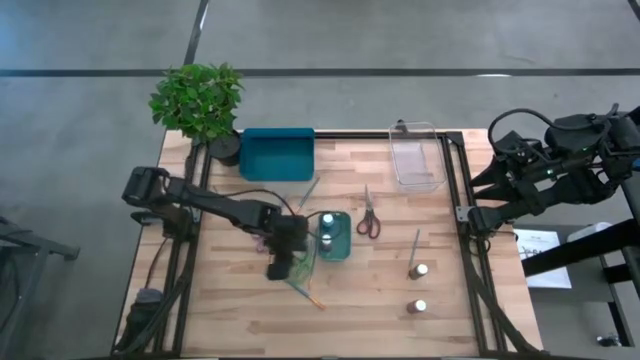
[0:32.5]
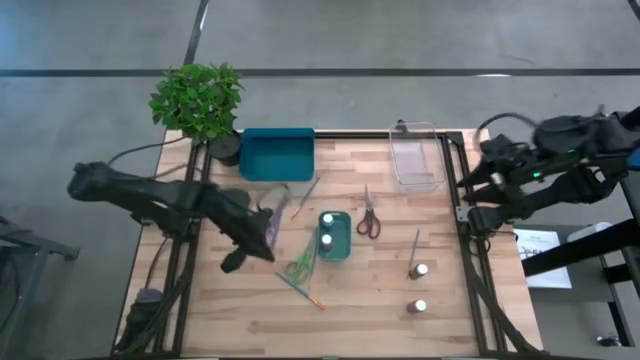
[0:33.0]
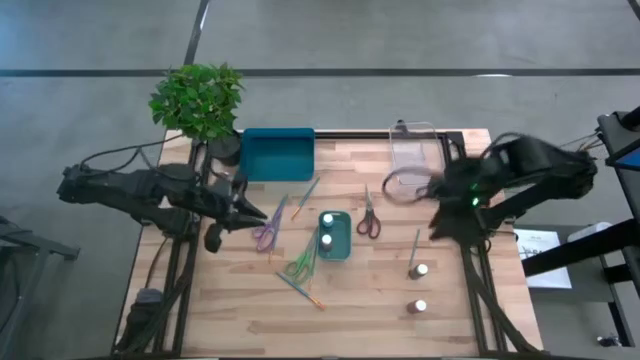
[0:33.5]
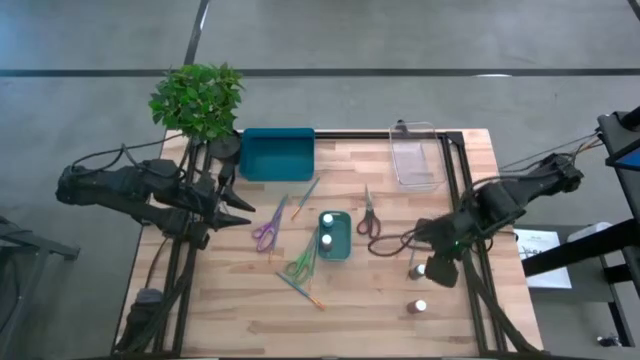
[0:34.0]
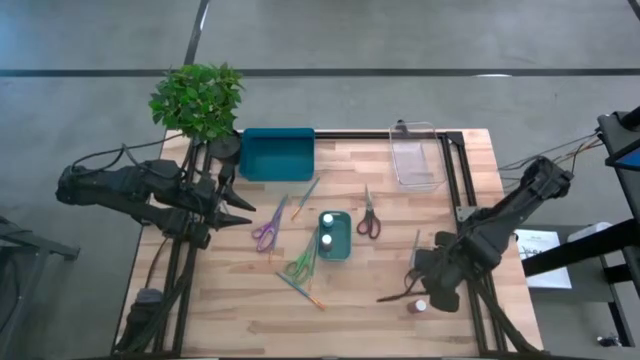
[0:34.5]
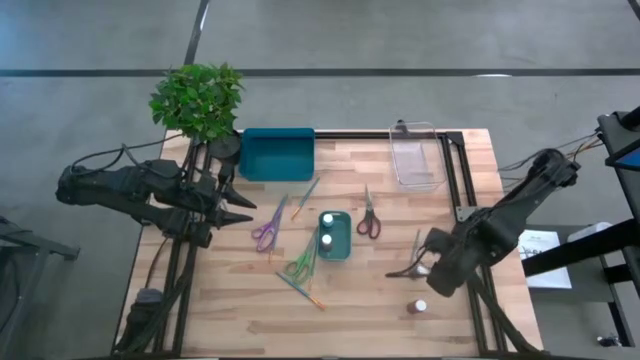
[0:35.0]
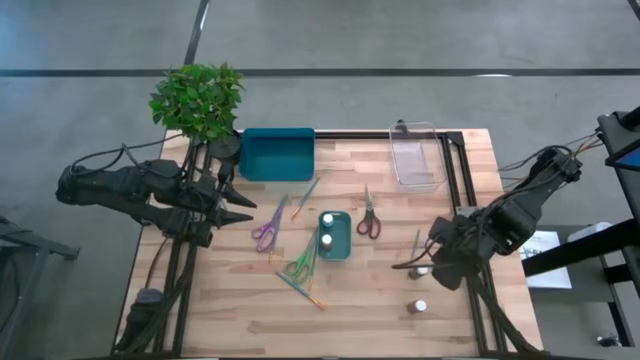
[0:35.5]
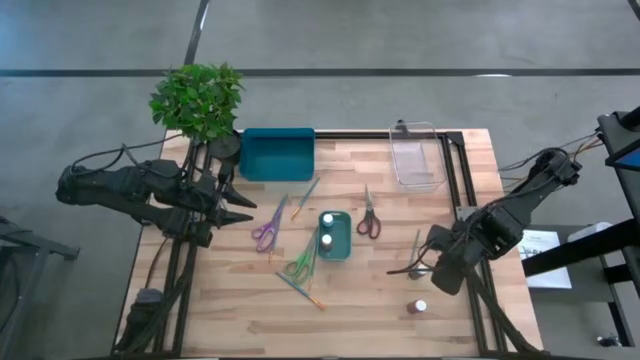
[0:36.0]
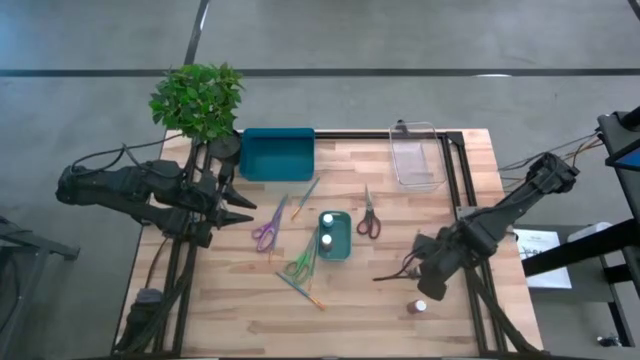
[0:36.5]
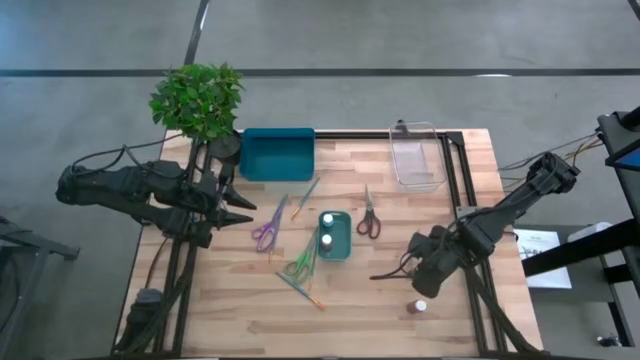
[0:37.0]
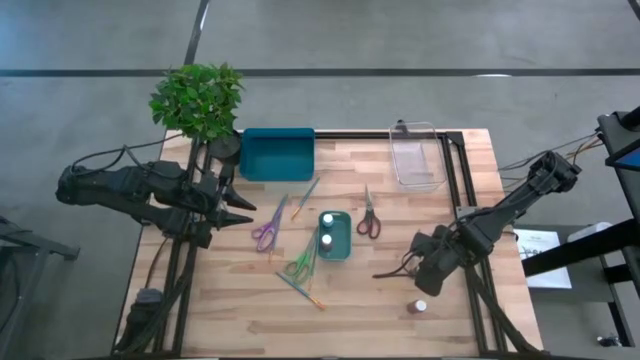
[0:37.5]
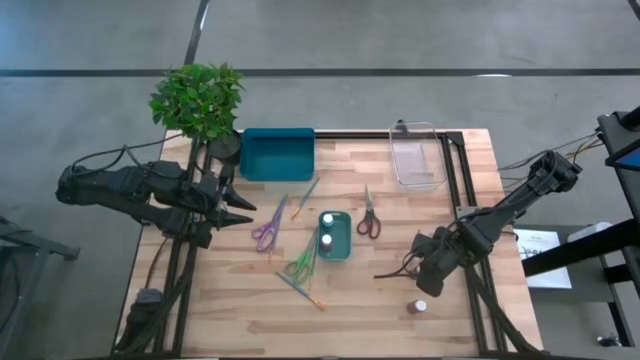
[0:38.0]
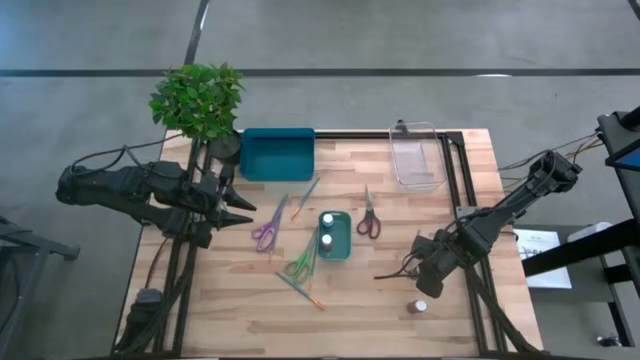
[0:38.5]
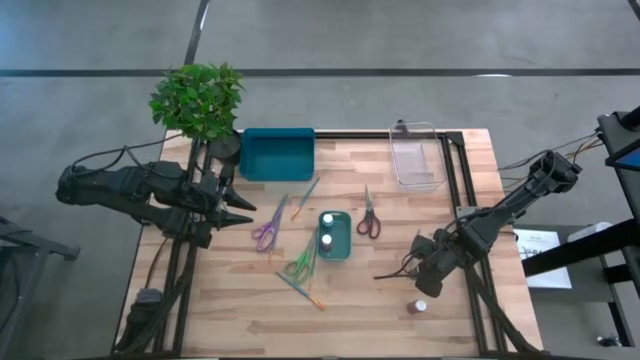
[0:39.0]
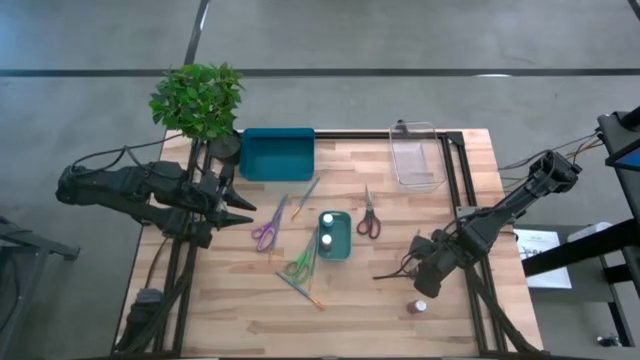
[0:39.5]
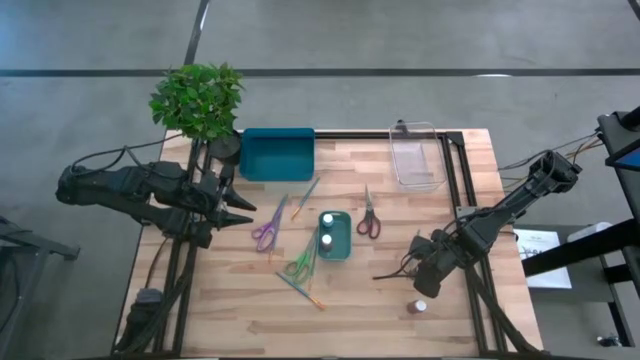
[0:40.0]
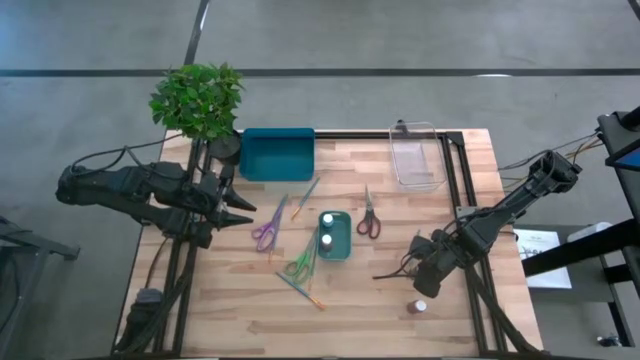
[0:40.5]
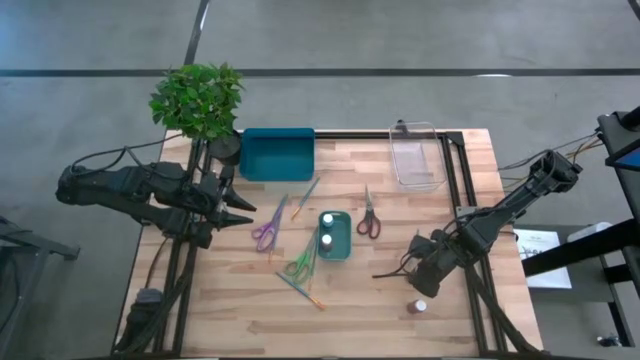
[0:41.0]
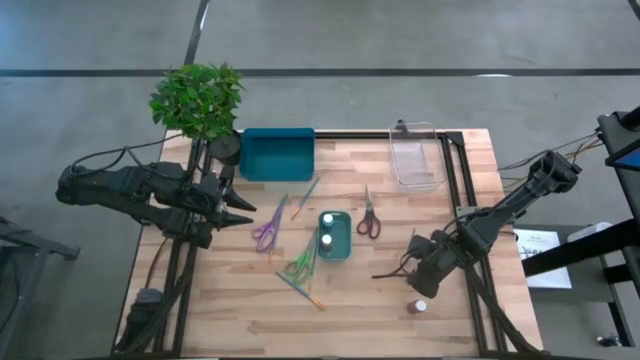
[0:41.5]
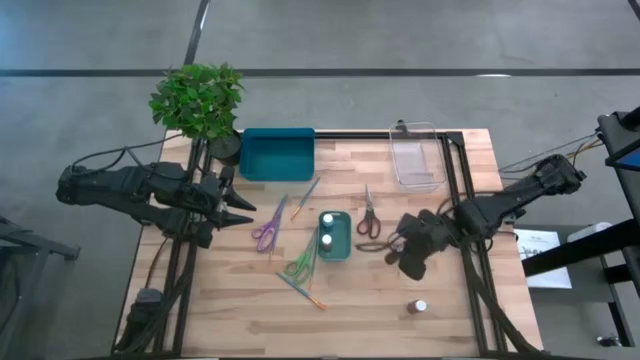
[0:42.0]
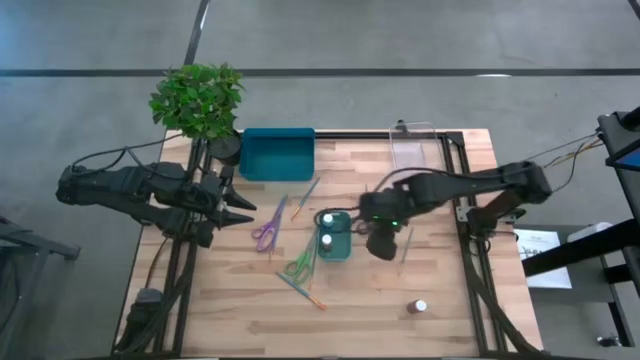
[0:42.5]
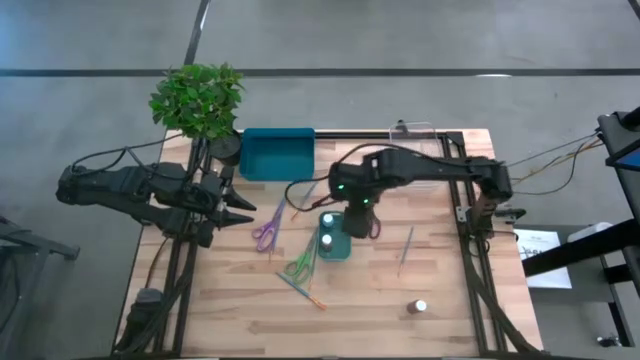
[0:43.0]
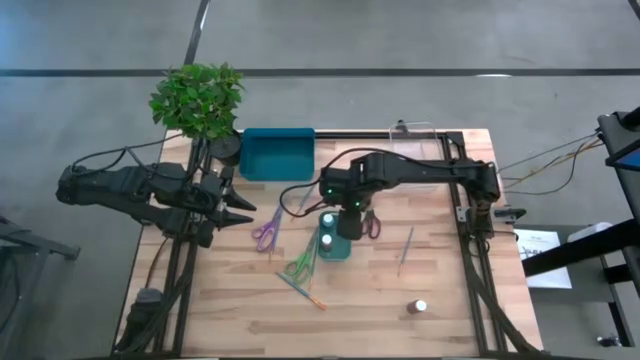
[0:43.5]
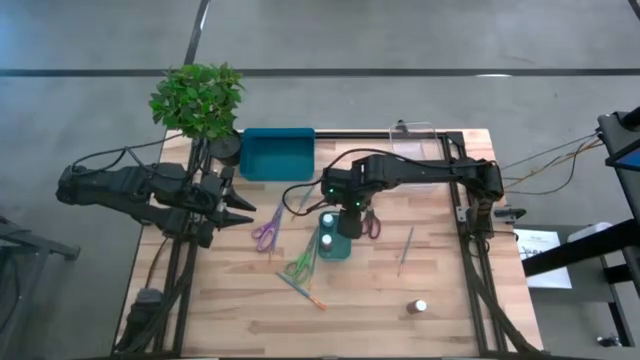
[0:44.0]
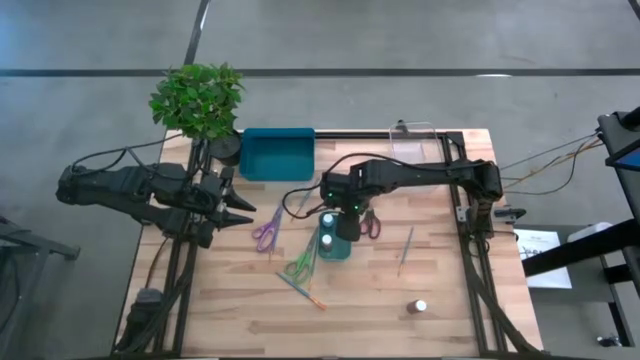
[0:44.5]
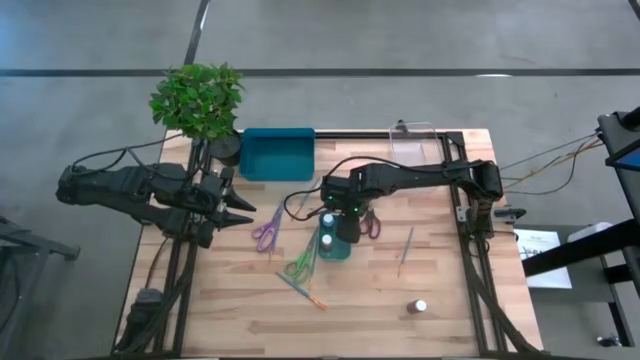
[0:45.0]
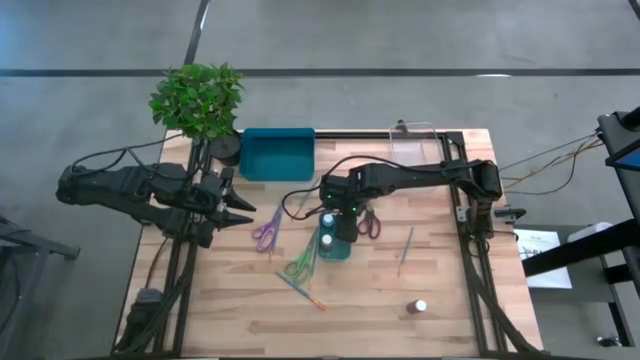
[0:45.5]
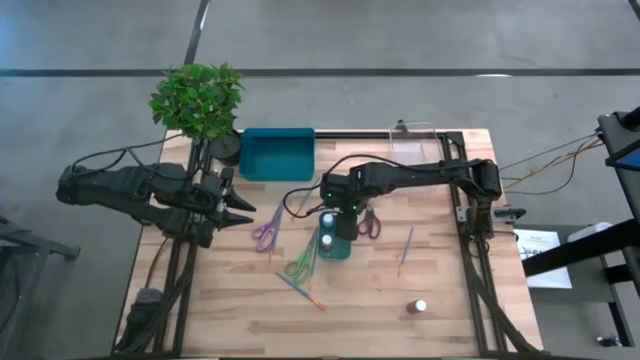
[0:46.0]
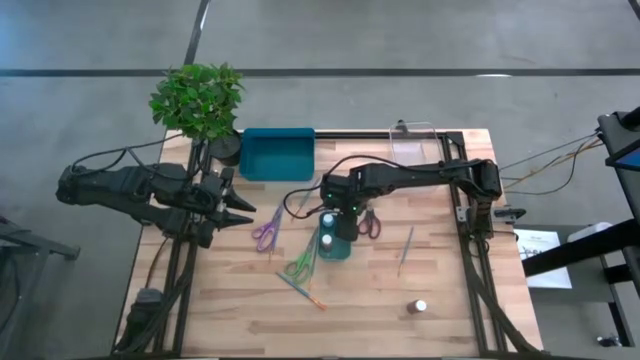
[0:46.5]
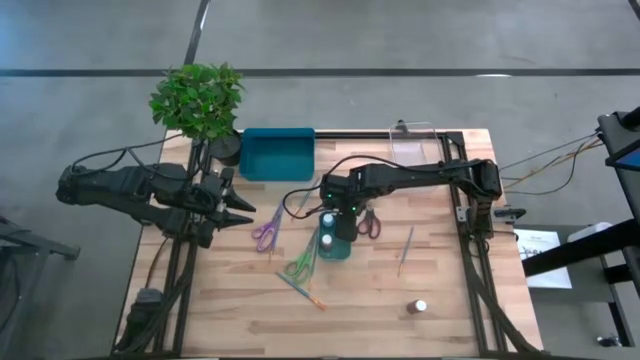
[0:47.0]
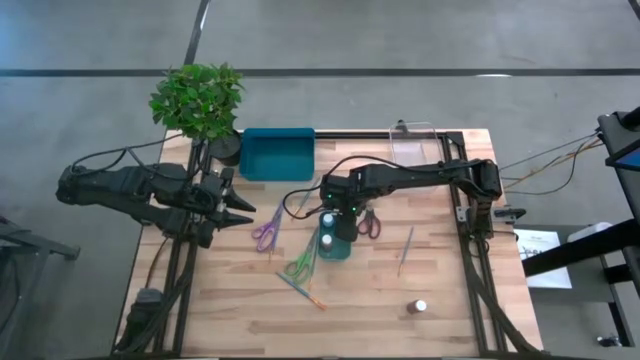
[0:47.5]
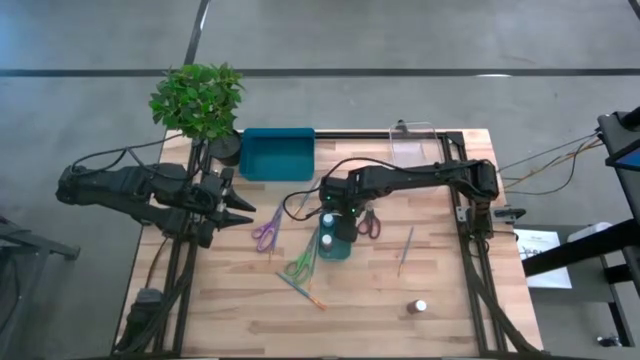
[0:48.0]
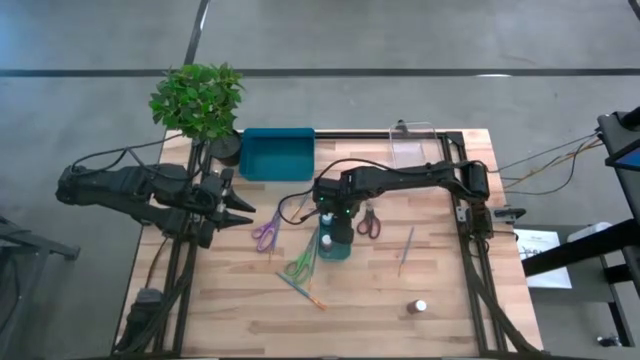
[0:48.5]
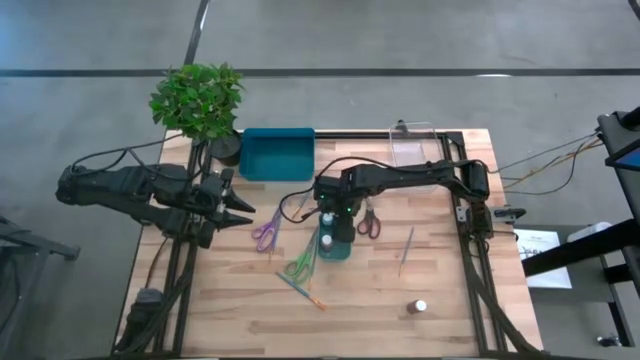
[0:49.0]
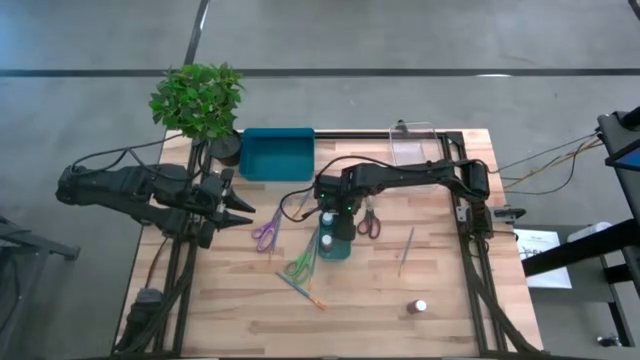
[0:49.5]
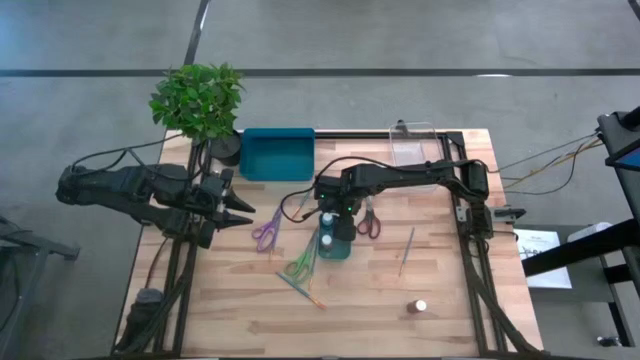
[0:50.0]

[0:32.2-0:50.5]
Task: Pick & Place Paint Supplies
Put the black paint bottle into the blue bin
